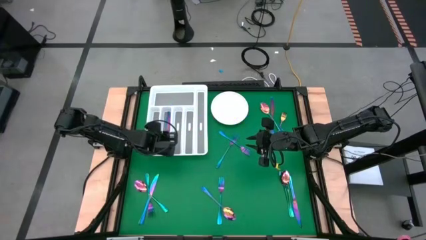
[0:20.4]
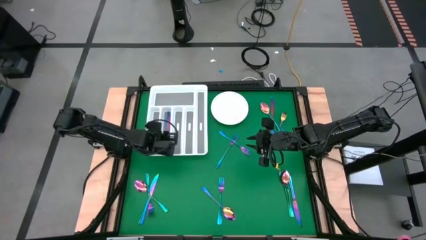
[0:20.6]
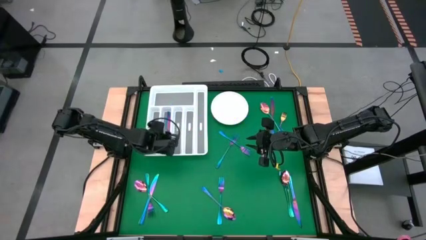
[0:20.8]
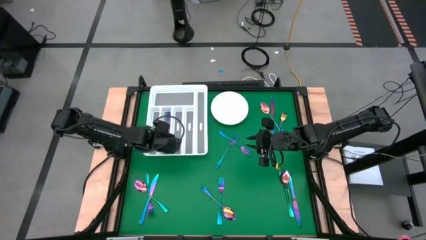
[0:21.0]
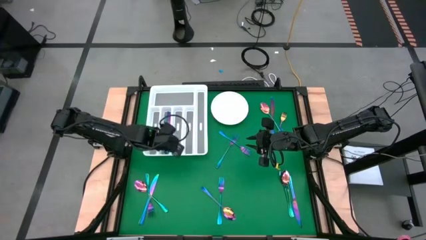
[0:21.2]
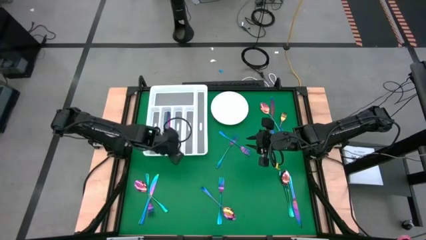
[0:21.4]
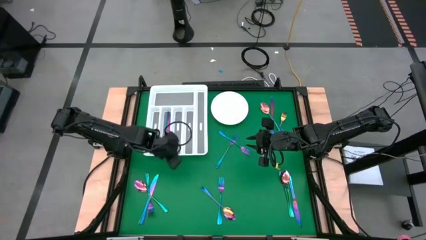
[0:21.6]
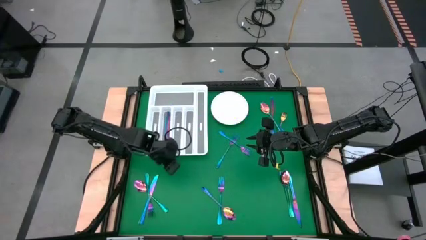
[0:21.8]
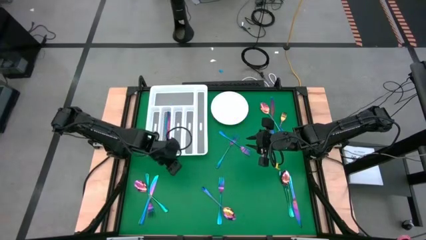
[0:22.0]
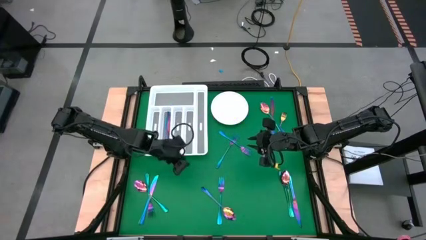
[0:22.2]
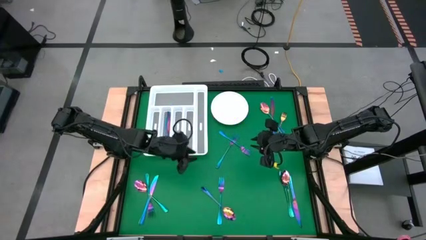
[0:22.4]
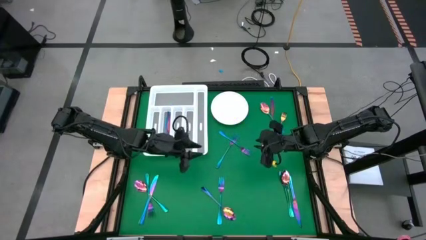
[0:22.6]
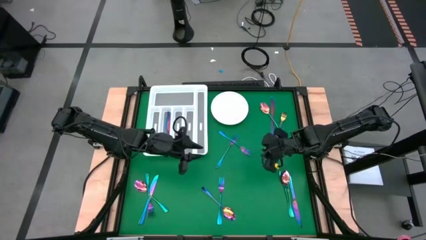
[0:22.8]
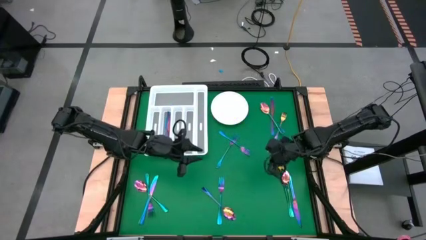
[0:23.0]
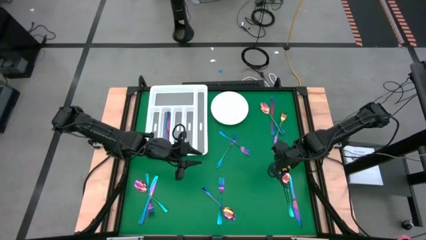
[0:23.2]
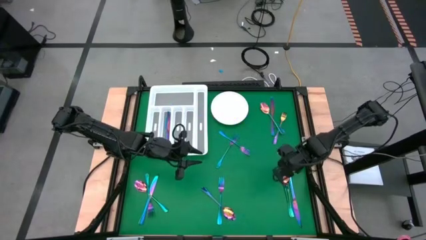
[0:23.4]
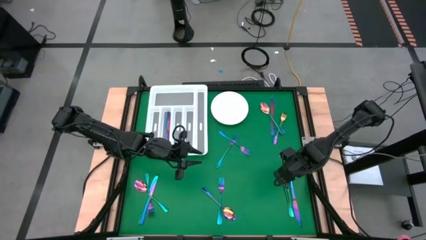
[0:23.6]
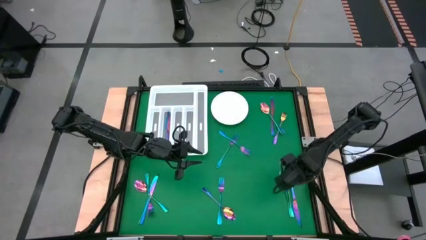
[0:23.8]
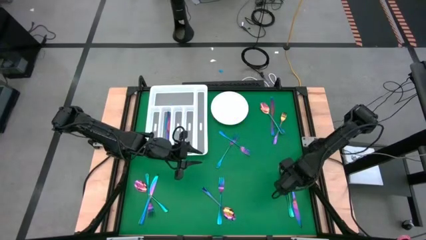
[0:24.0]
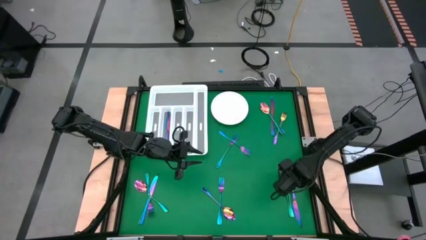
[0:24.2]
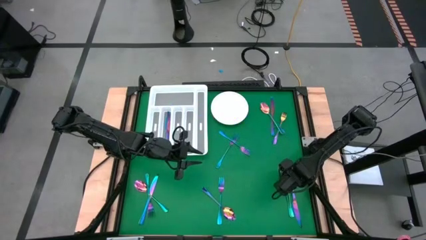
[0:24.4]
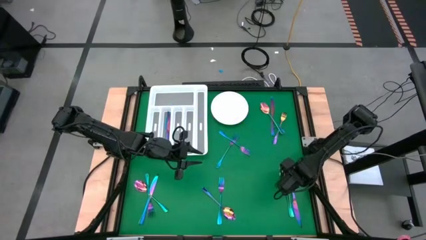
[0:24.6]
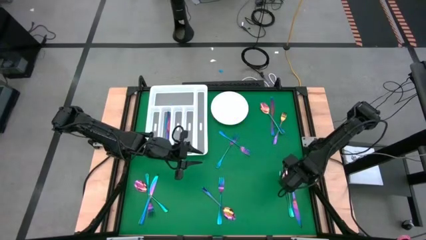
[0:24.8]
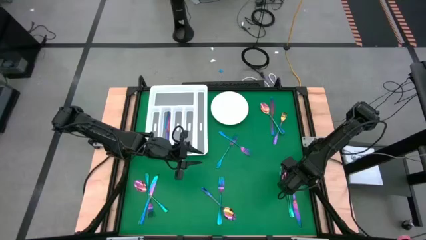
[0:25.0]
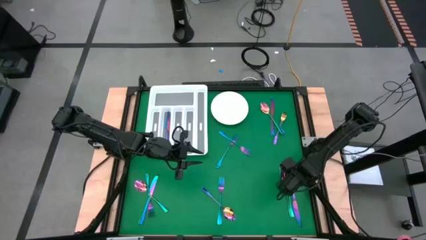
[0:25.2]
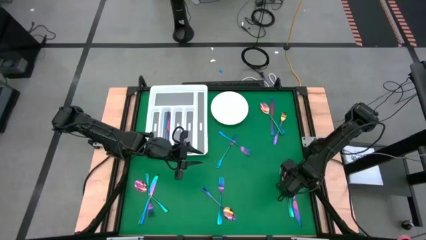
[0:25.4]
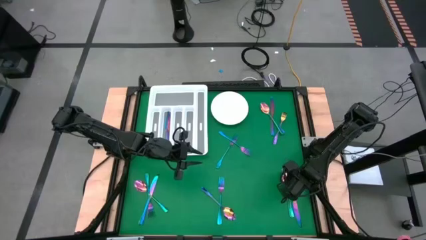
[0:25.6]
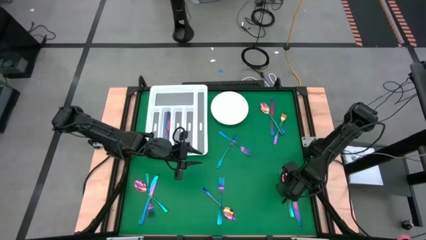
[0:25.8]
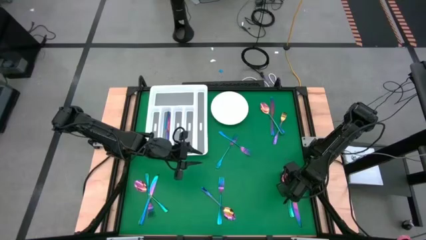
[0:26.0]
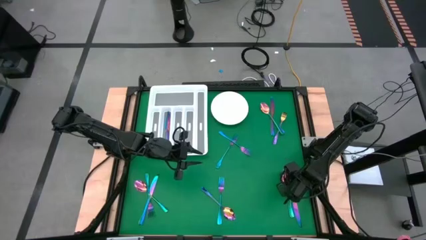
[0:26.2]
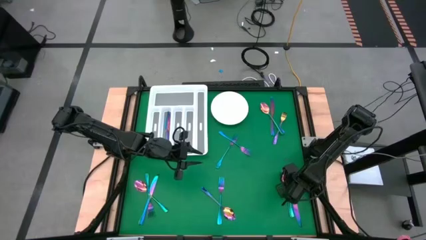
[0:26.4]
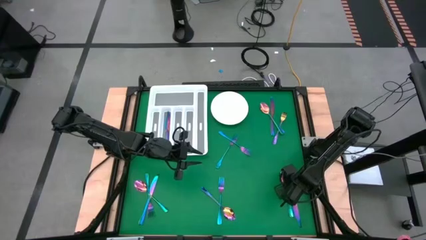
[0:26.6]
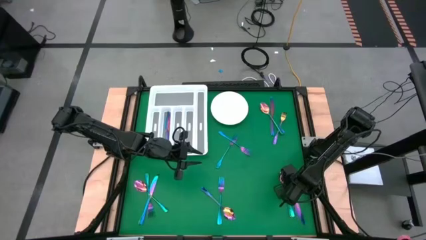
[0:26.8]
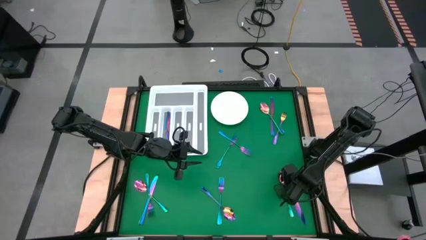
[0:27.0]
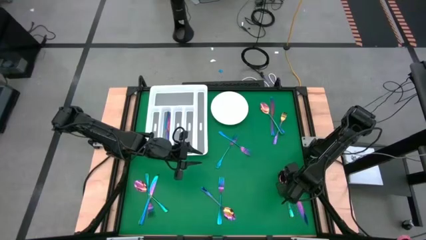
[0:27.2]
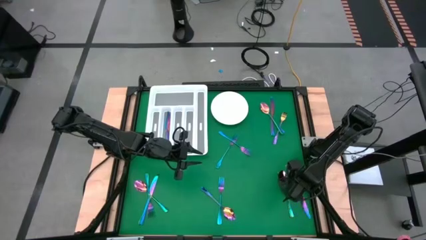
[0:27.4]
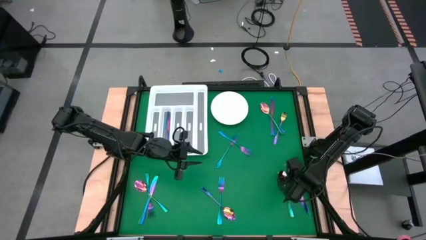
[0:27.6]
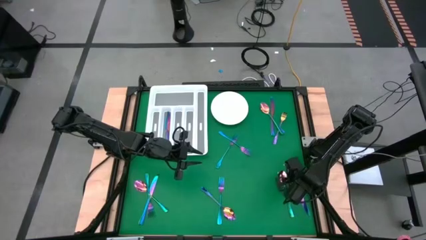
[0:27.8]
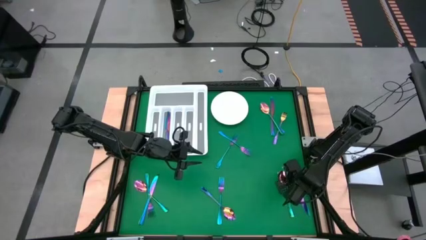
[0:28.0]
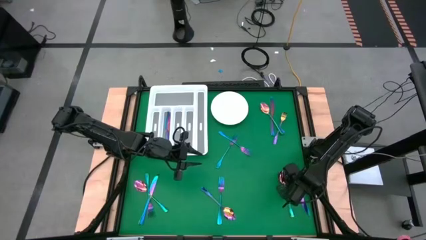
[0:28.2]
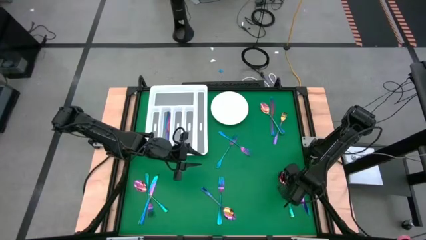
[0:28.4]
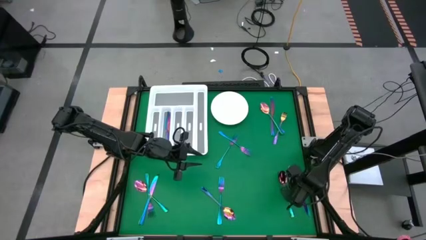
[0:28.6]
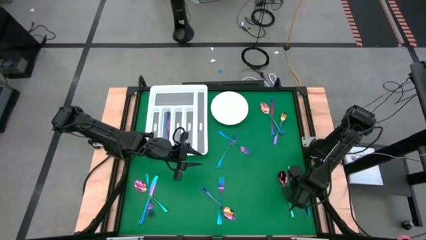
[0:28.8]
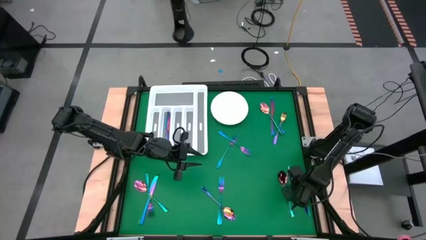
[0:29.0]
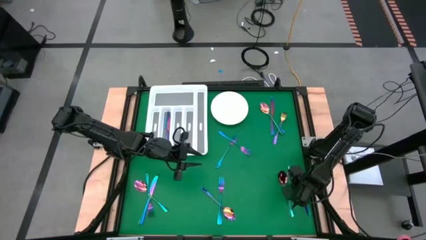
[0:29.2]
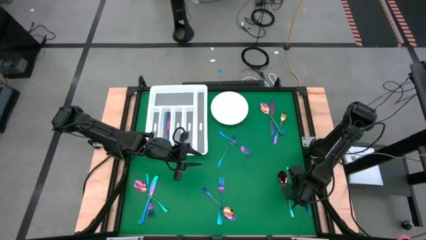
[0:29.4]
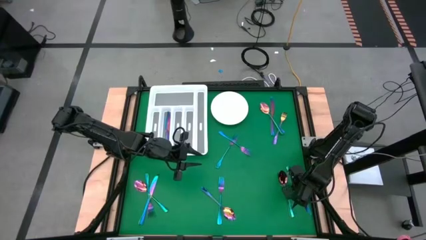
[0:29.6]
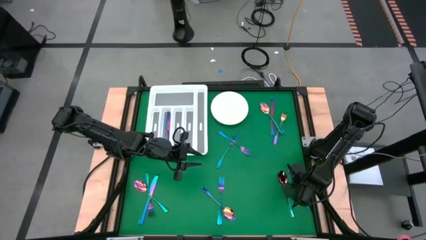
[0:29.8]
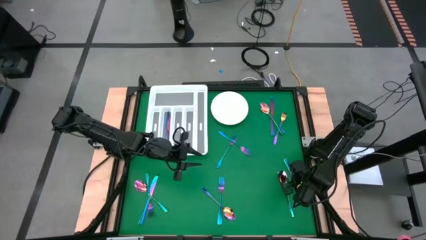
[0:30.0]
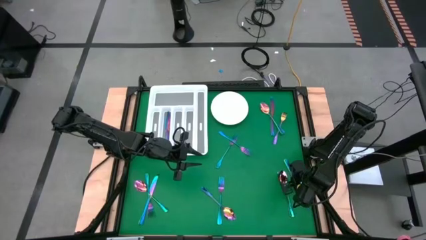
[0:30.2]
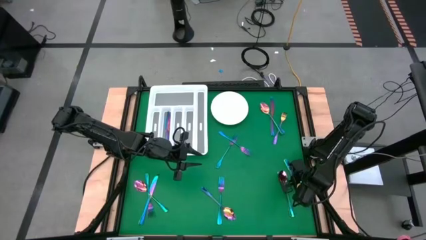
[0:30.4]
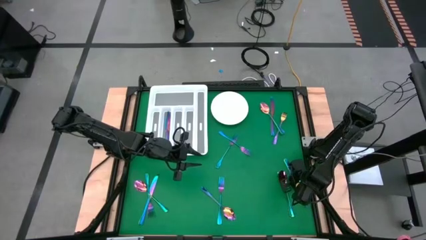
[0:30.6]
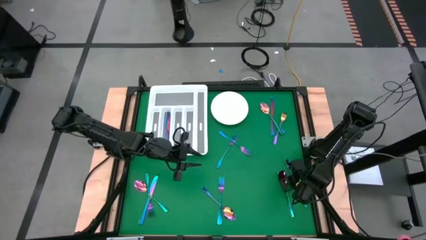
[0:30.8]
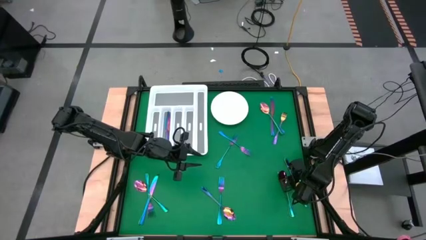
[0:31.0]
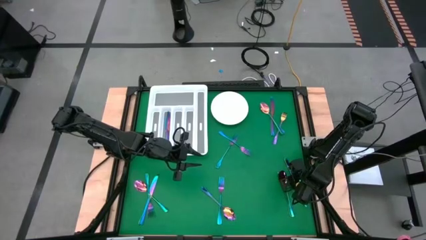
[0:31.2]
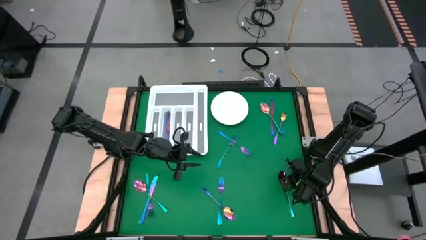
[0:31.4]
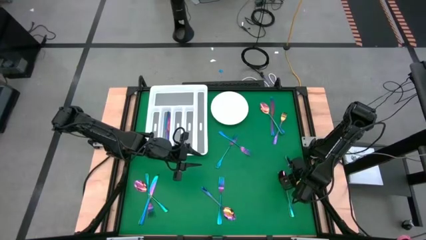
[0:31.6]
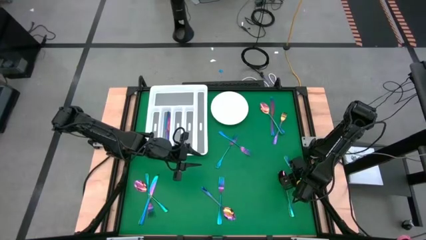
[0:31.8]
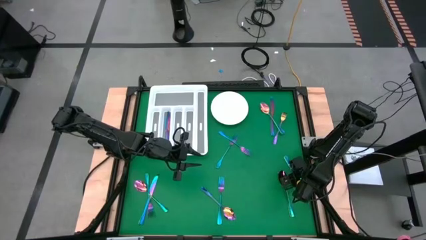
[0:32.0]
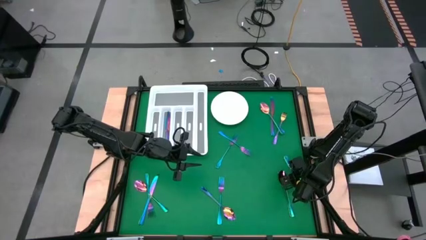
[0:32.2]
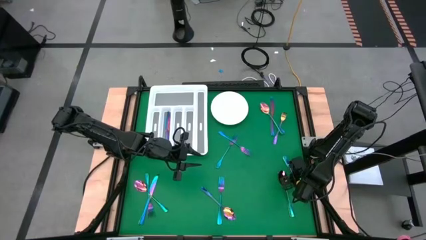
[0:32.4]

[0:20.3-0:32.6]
Task: Sort silverware
Put the blue knife into the silverware tray
